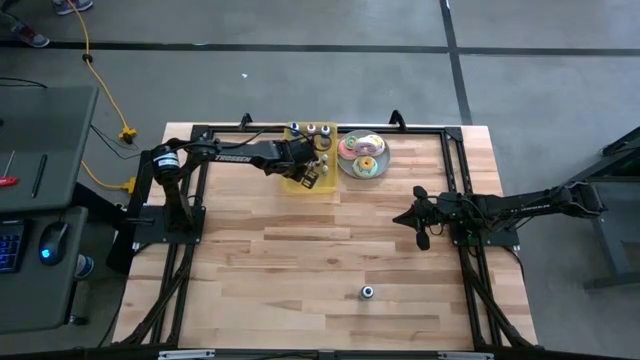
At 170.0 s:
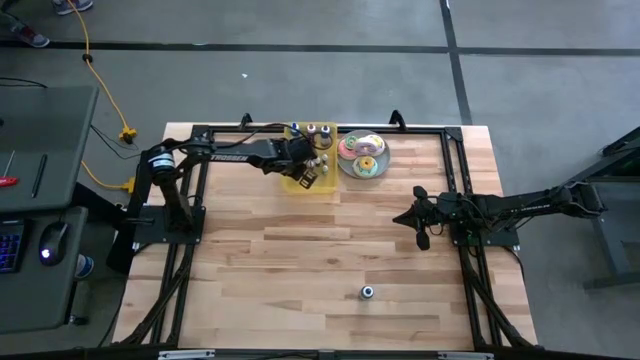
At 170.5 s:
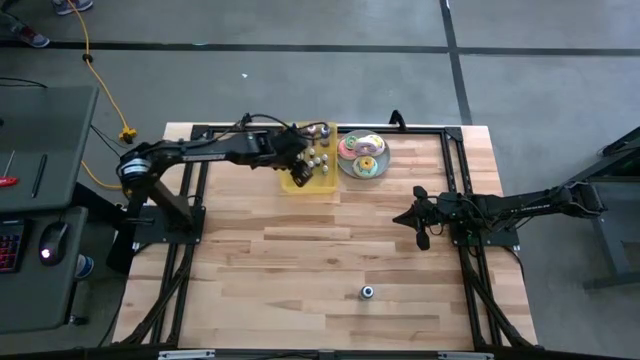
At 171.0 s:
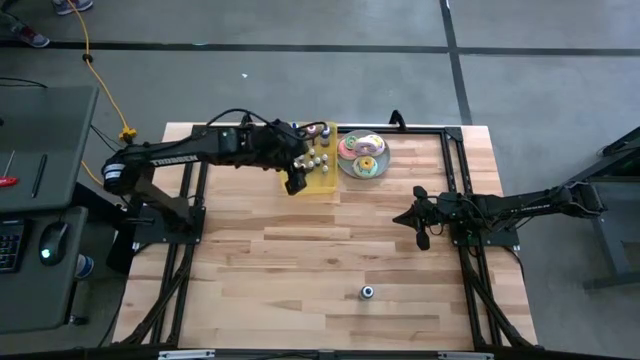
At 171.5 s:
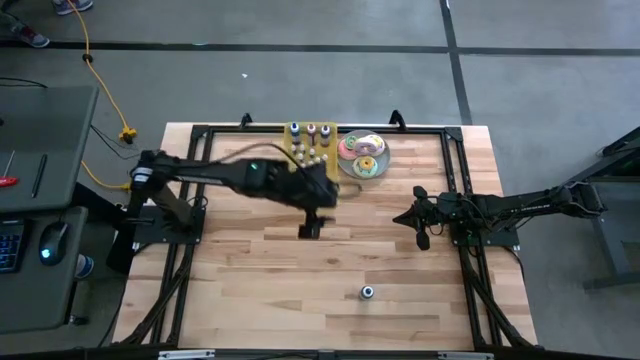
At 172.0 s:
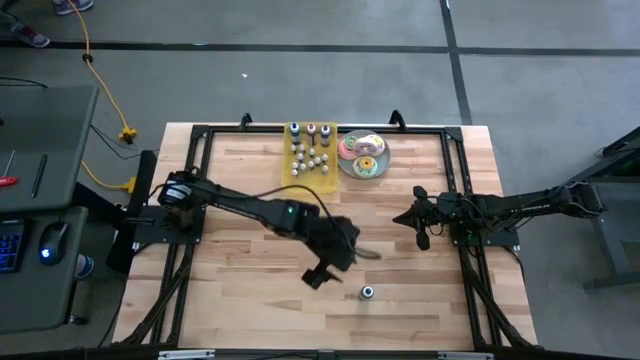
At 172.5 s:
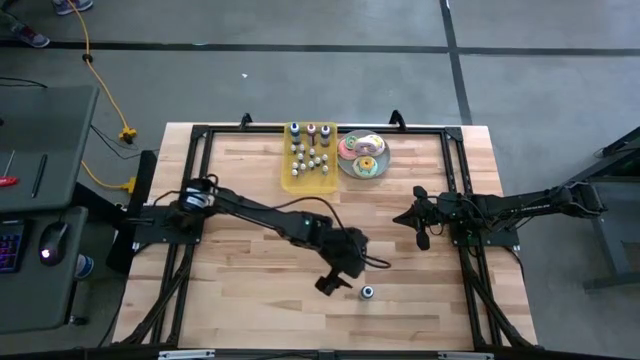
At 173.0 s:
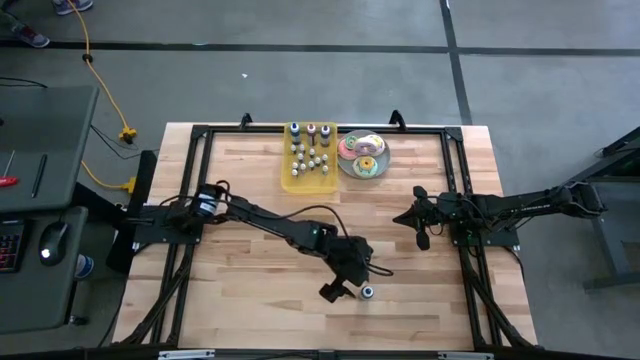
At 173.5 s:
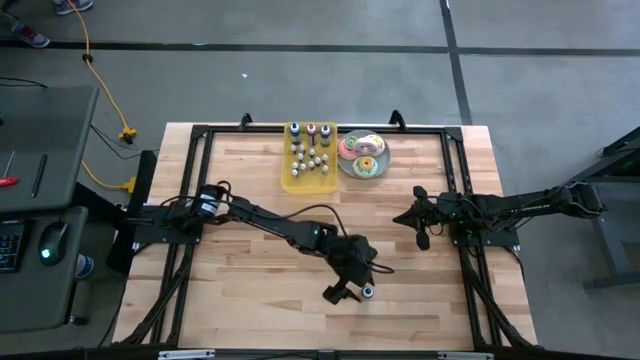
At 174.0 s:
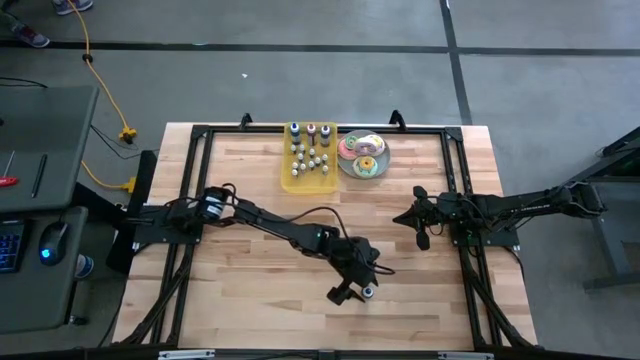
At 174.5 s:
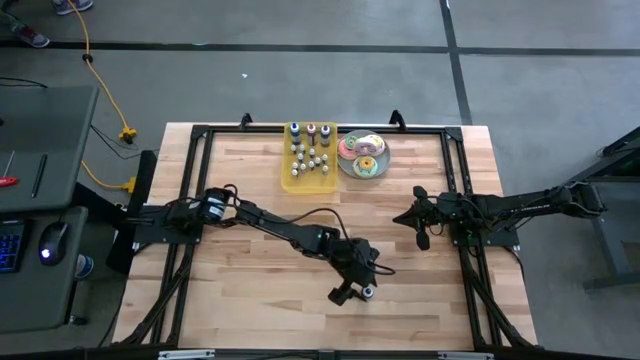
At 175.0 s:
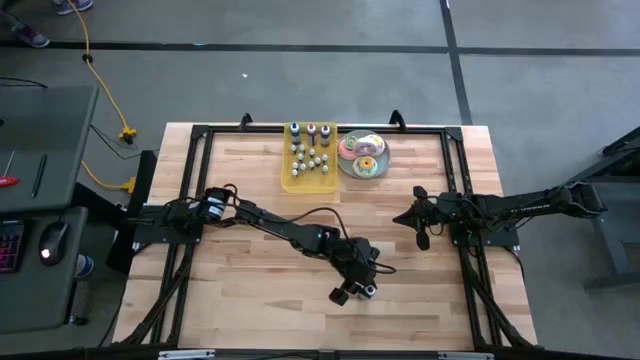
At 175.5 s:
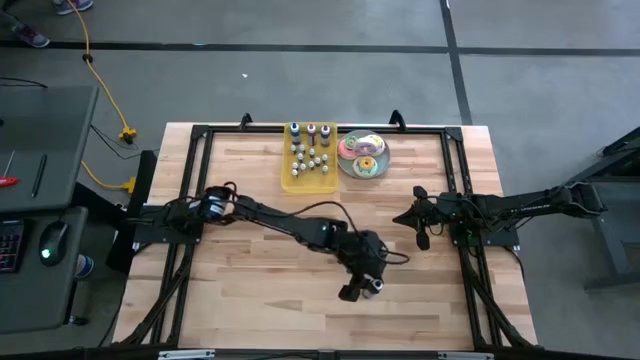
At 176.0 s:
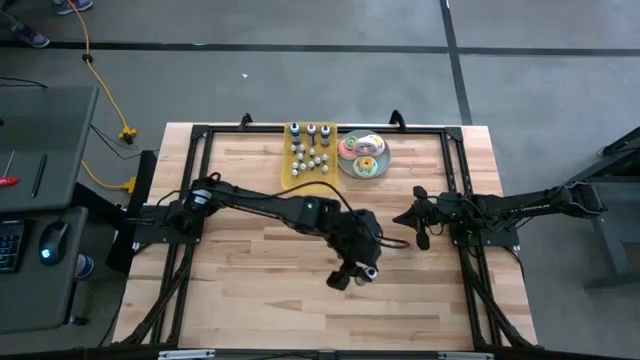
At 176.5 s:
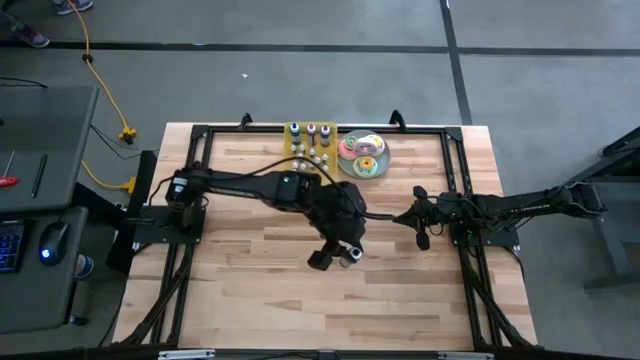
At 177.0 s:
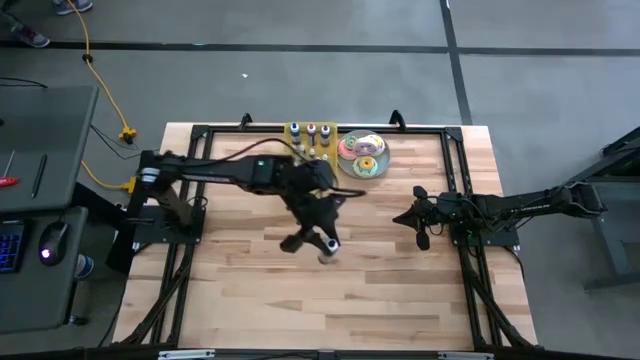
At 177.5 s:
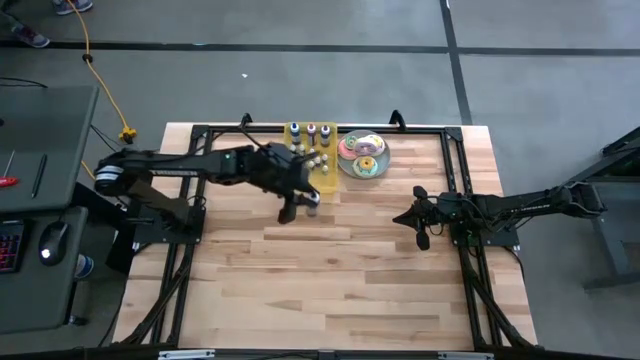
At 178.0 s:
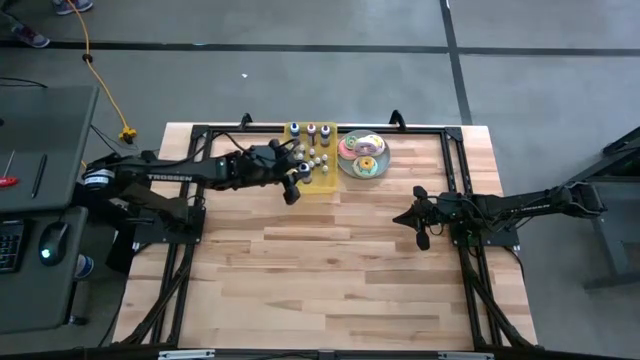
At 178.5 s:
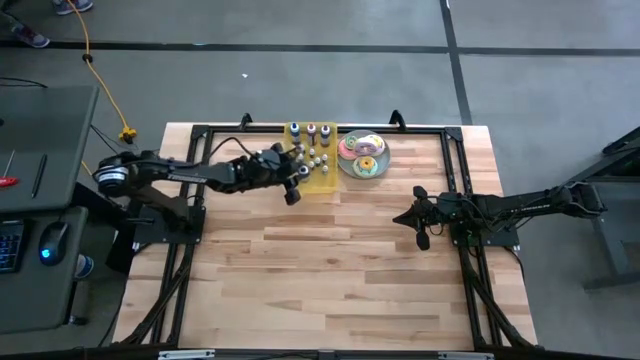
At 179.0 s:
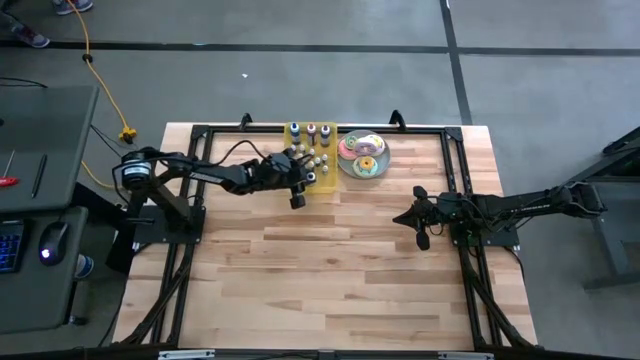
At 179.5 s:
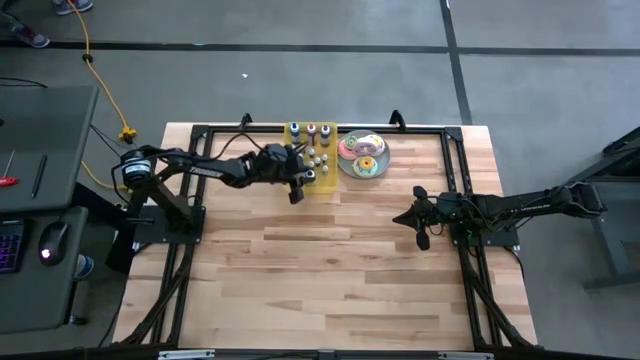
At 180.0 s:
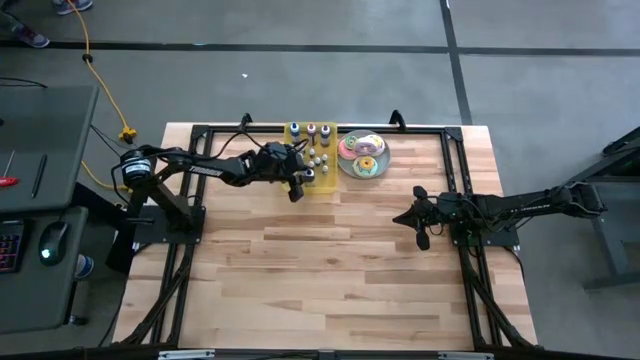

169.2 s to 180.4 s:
Task: Pick & Place food coloring
Put the big black food coloring bottle into the bin

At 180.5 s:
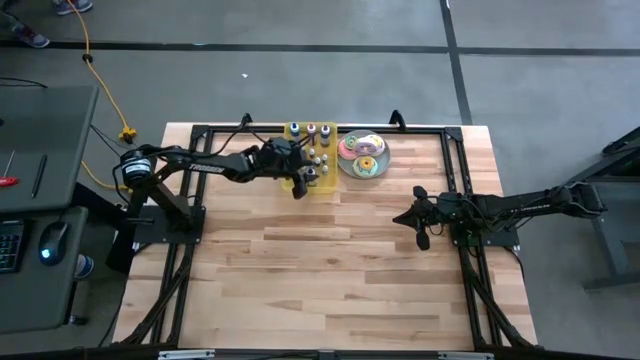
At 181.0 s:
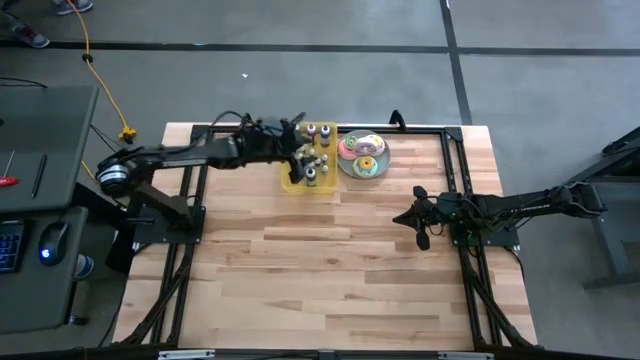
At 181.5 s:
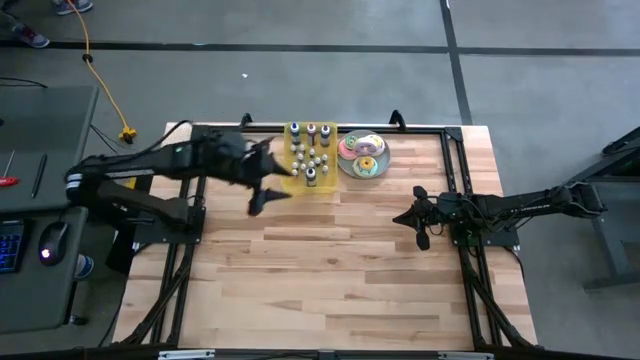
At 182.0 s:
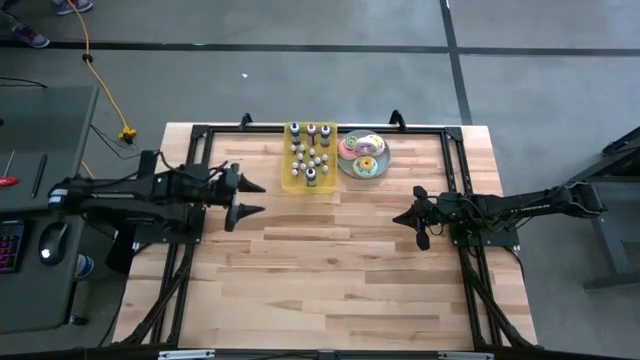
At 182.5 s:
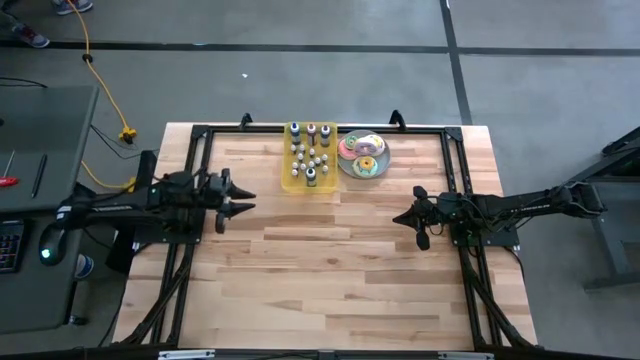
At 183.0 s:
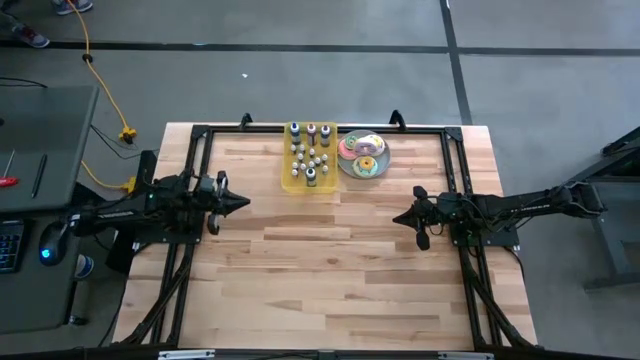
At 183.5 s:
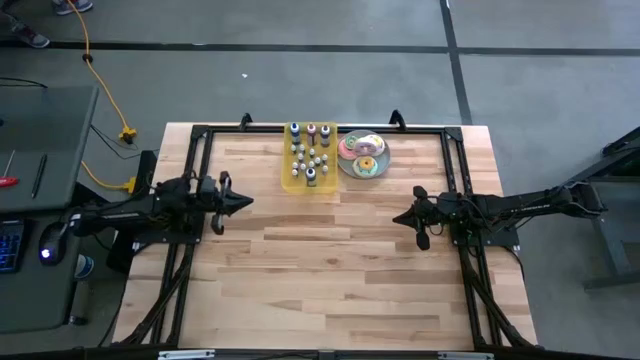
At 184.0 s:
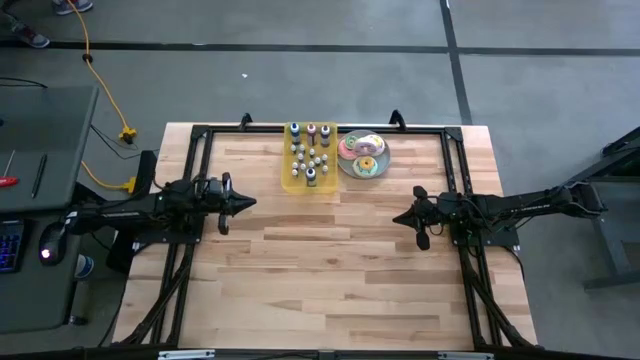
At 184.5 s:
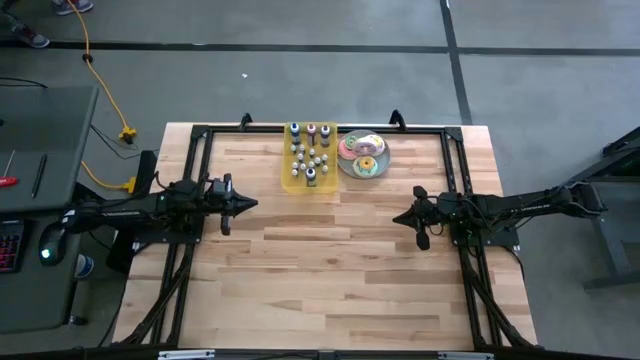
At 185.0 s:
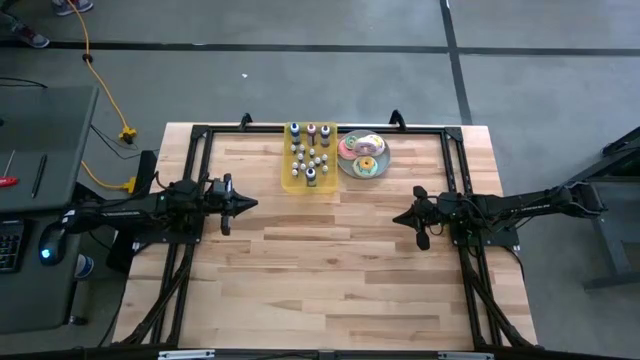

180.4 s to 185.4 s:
Return to Home Position

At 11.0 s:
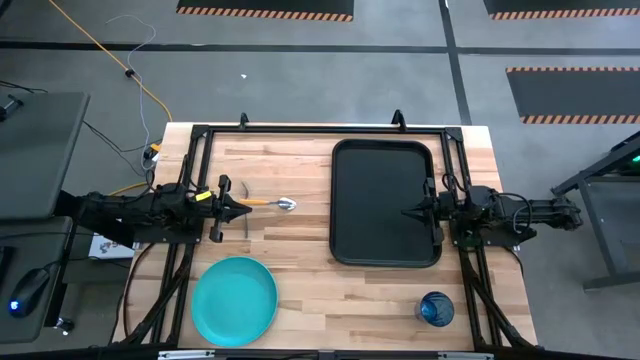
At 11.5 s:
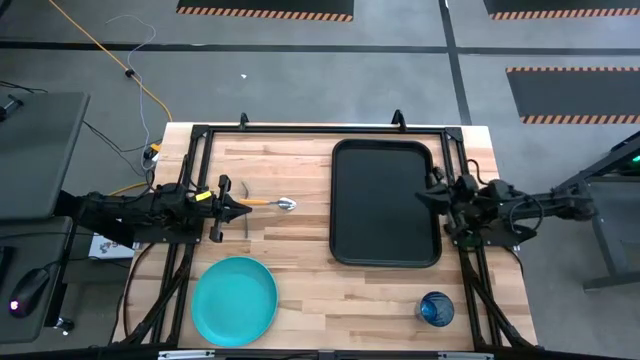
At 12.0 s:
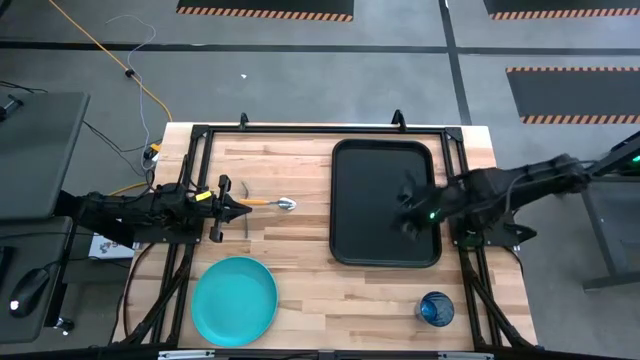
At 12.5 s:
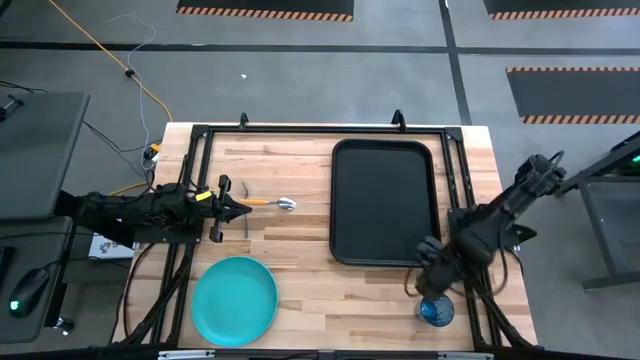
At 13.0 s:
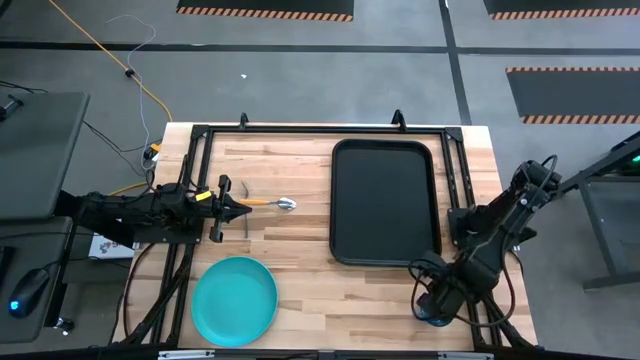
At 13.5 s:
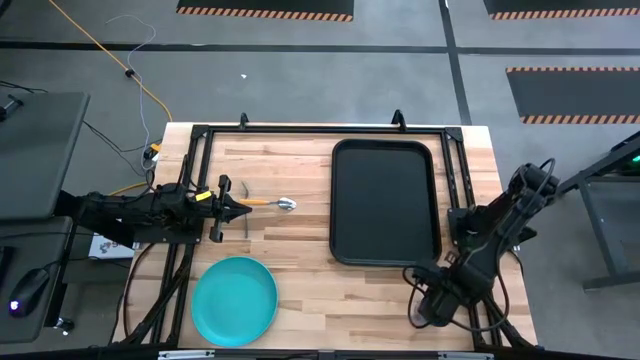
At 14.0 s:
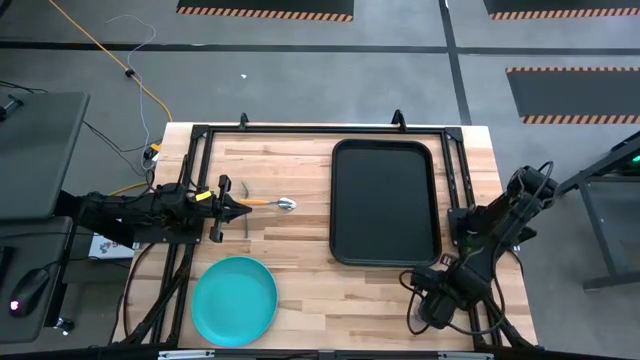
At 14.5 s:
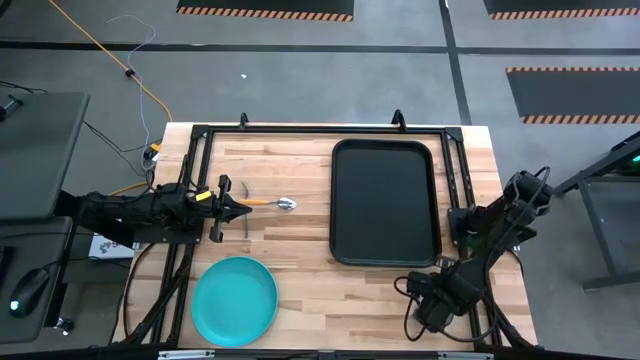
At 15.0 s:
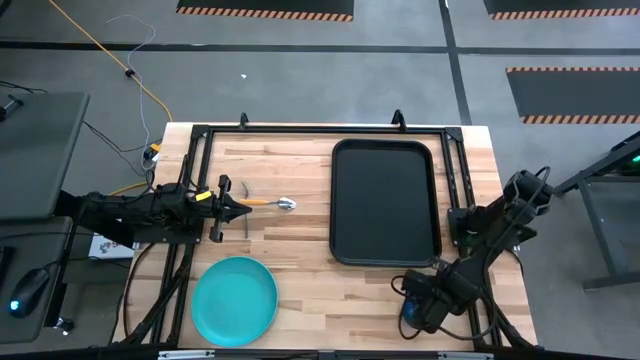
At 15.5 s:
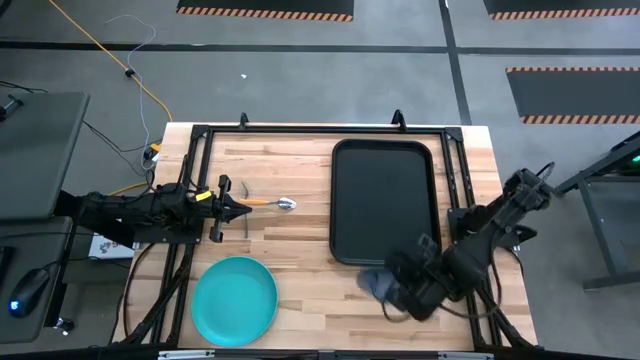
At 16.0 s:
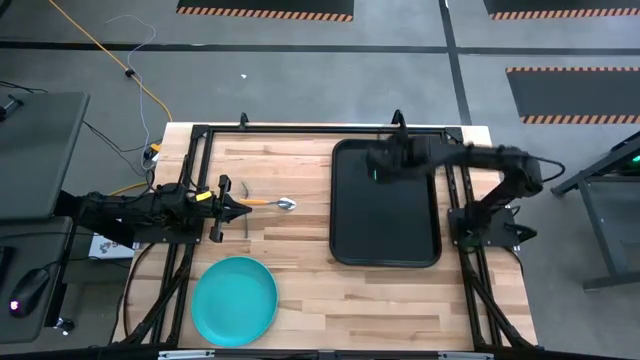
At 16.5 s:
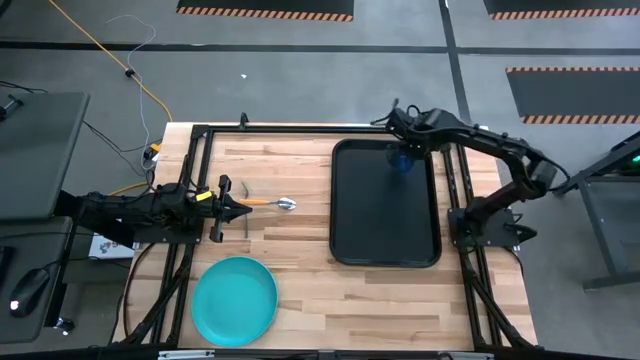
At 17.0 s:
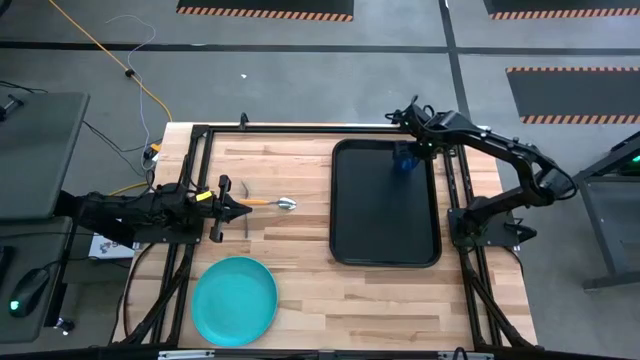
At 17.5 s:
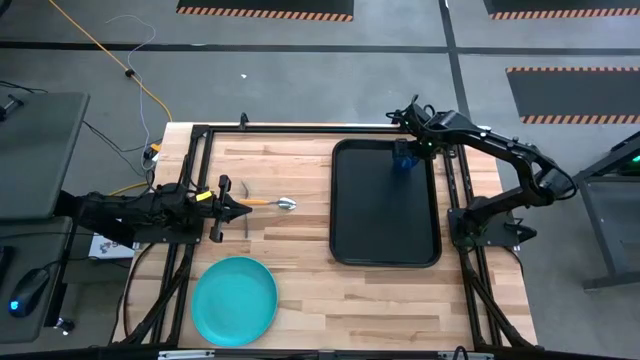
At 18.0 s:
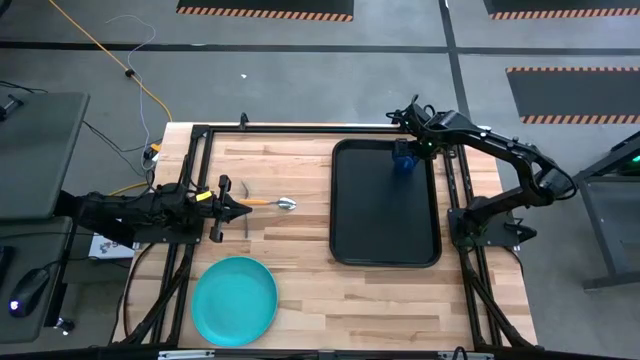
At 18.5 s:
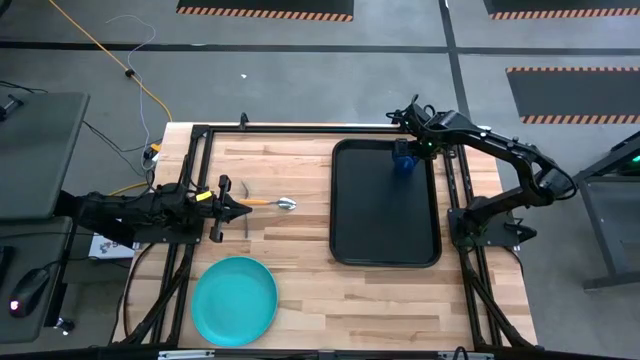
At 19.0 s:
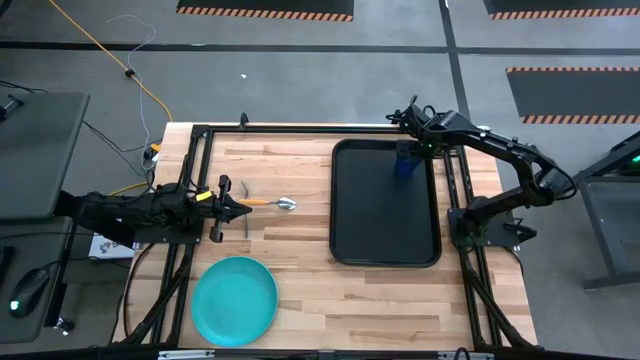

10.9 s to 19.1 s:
Task: Pick and place plate/cup/fork/spoon on tray
Put the blue cup at the top right of the black serving tray
